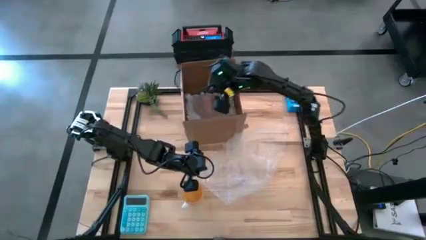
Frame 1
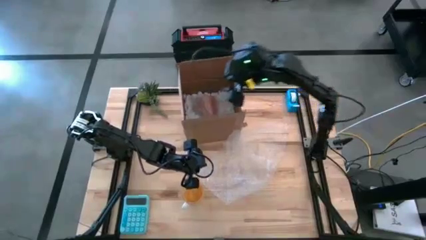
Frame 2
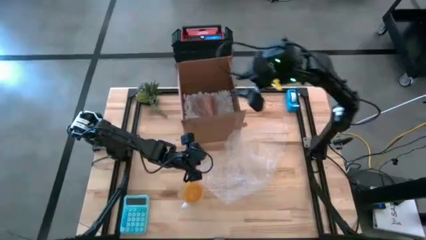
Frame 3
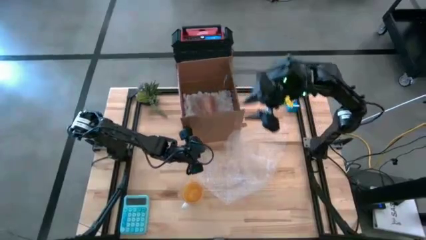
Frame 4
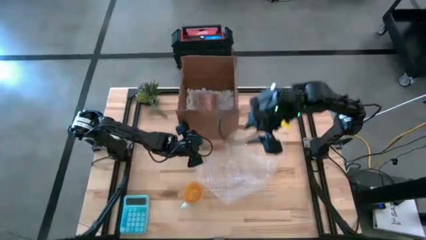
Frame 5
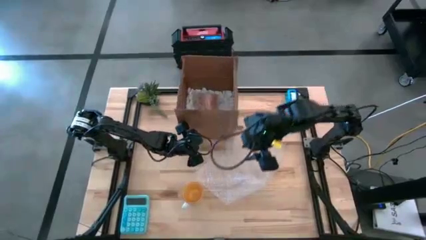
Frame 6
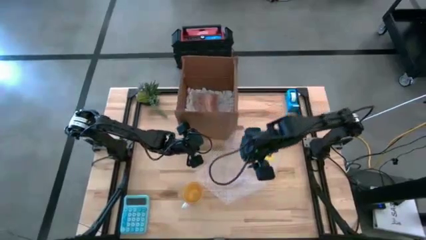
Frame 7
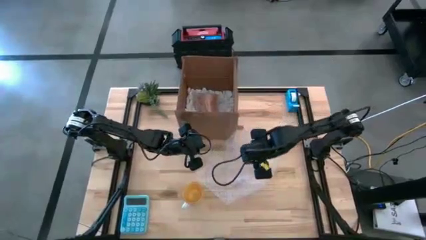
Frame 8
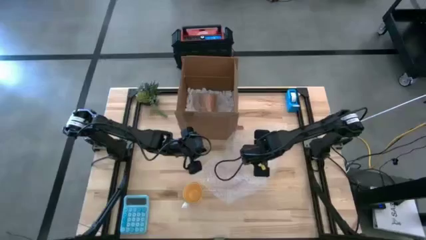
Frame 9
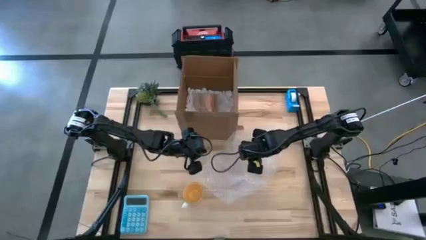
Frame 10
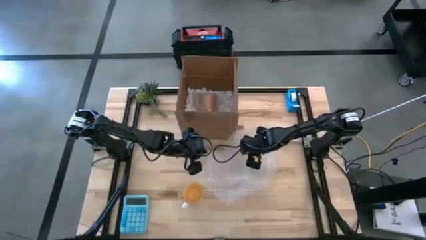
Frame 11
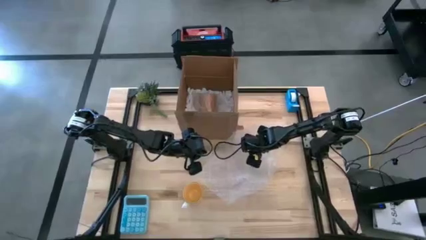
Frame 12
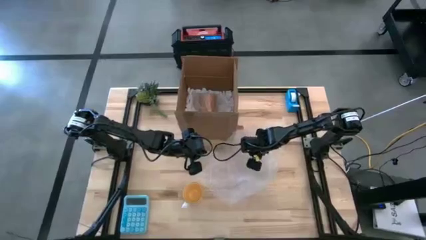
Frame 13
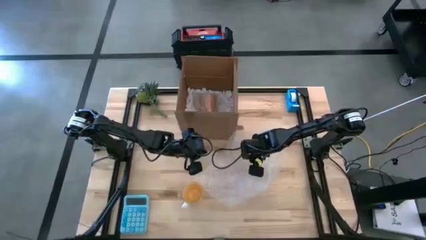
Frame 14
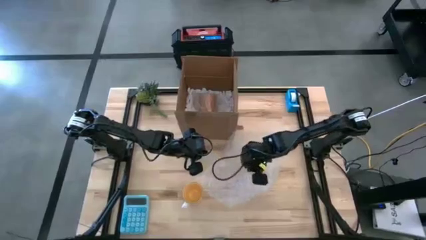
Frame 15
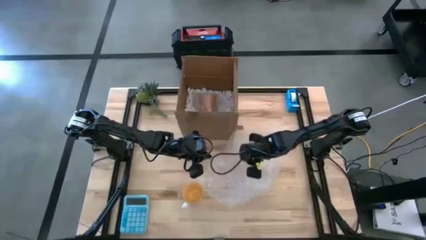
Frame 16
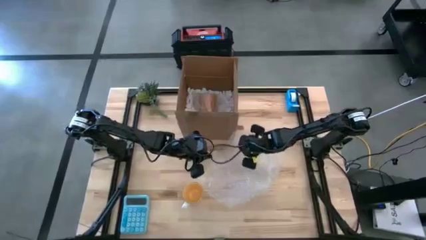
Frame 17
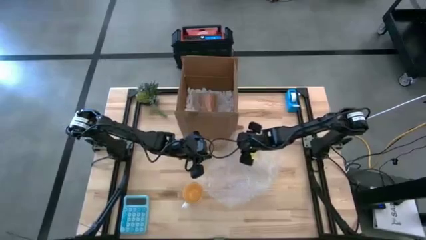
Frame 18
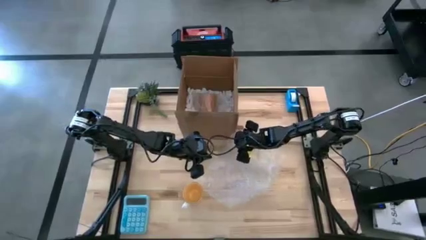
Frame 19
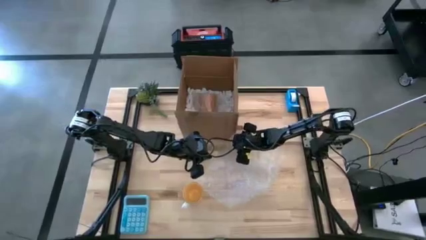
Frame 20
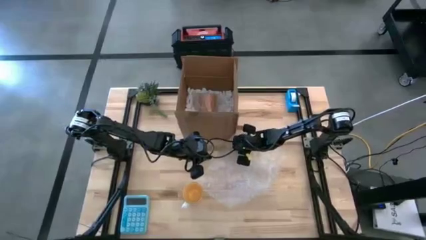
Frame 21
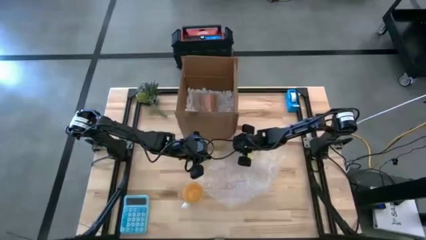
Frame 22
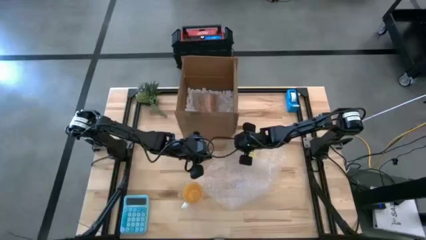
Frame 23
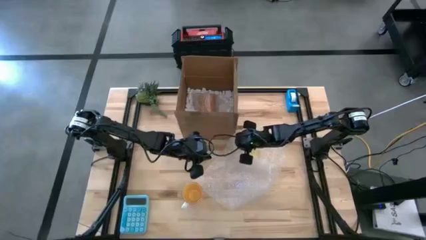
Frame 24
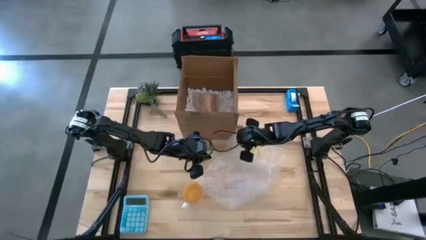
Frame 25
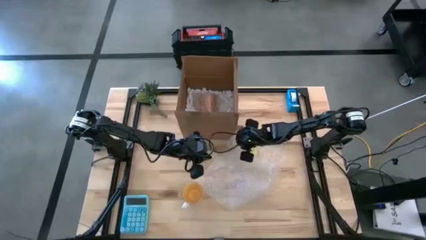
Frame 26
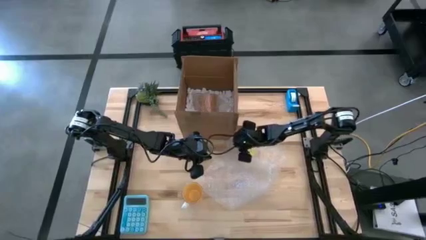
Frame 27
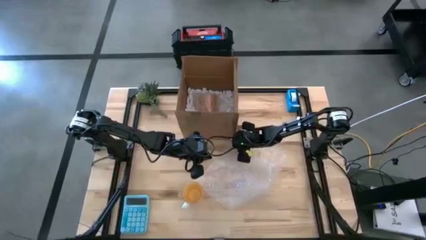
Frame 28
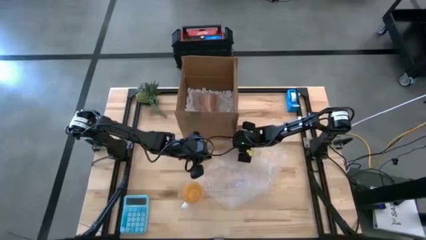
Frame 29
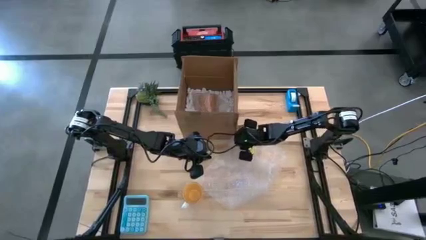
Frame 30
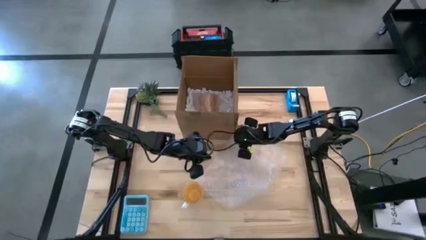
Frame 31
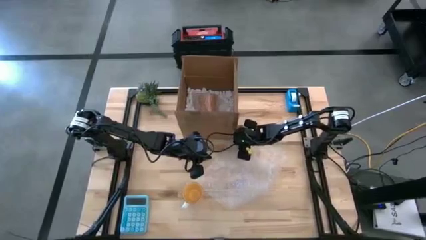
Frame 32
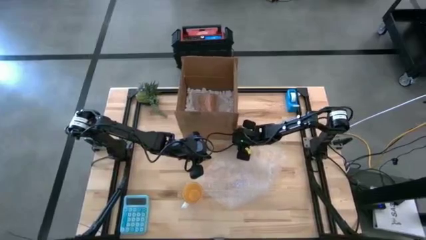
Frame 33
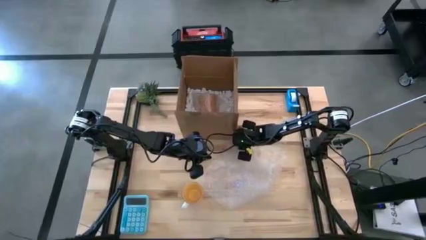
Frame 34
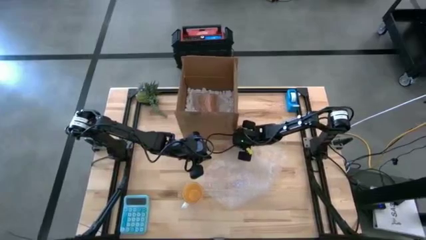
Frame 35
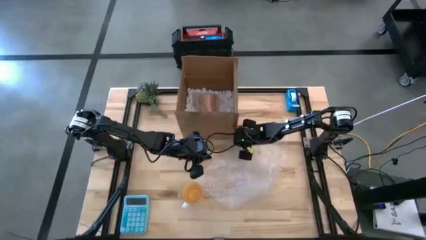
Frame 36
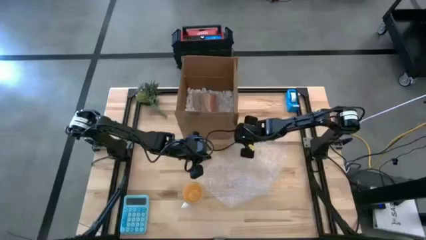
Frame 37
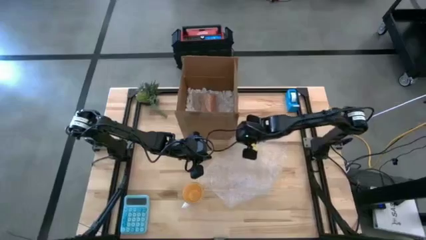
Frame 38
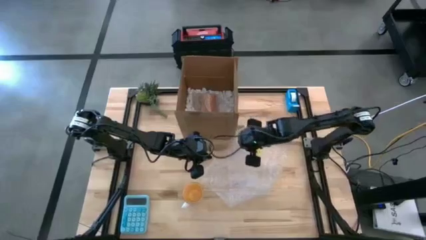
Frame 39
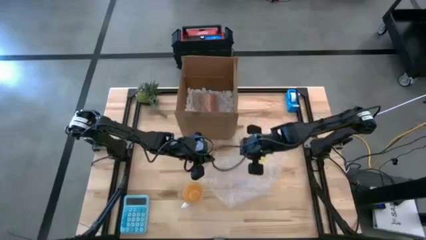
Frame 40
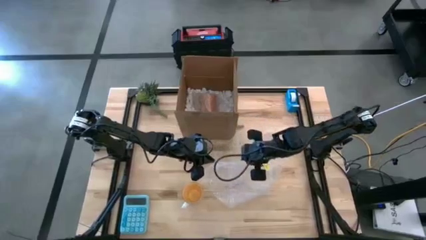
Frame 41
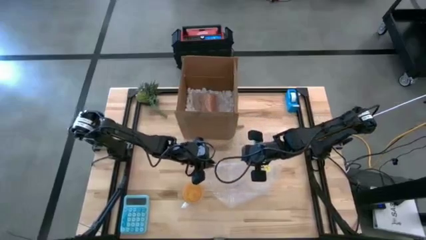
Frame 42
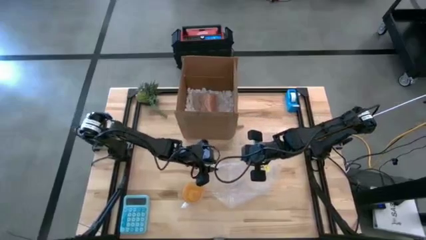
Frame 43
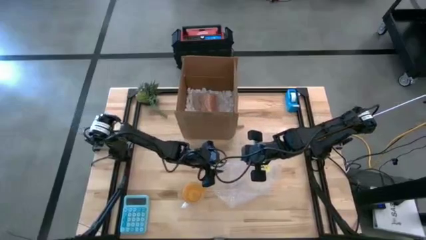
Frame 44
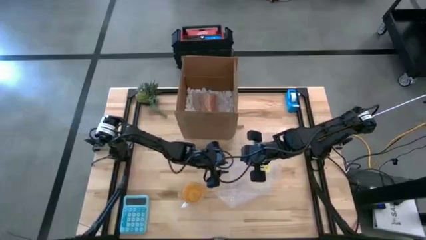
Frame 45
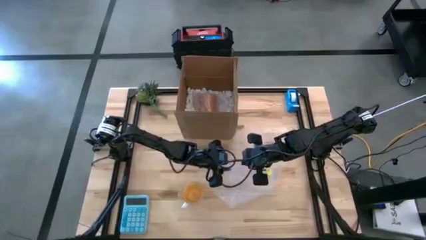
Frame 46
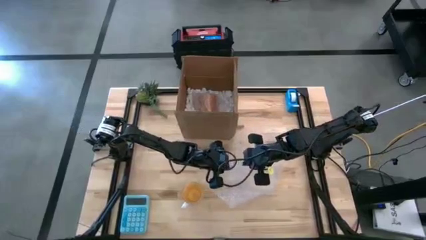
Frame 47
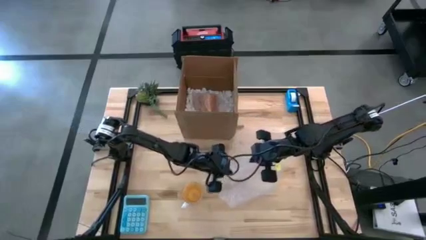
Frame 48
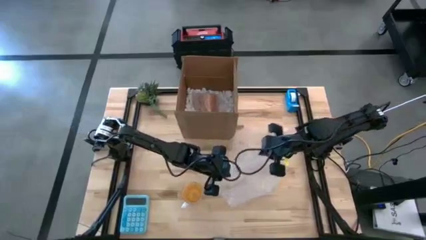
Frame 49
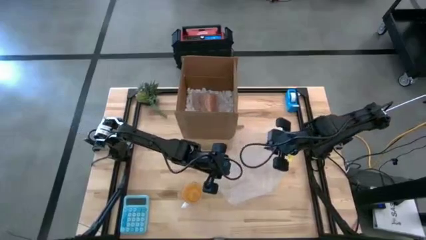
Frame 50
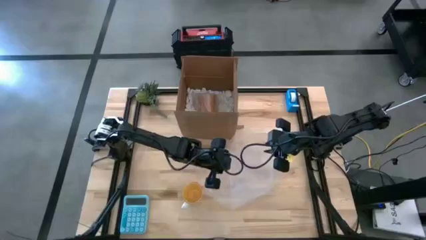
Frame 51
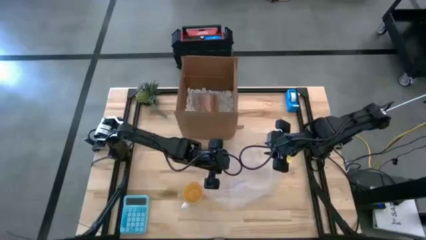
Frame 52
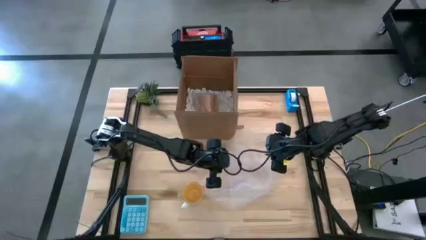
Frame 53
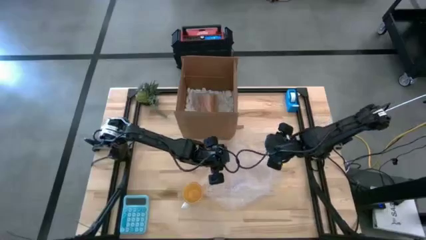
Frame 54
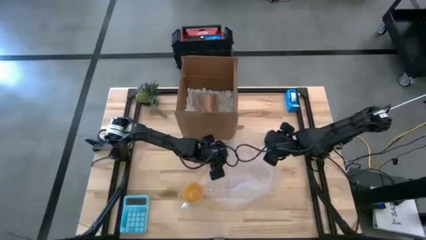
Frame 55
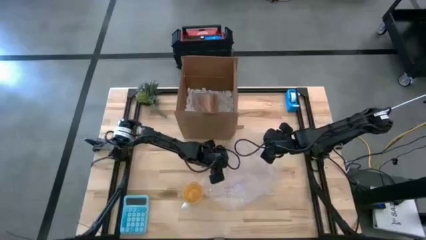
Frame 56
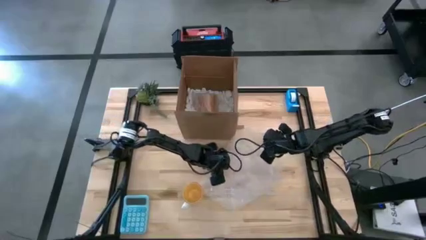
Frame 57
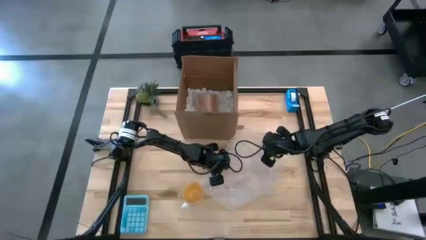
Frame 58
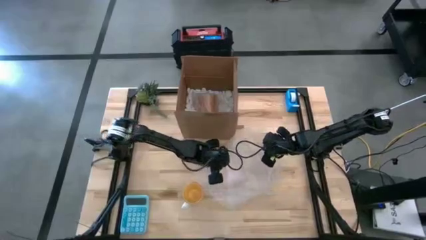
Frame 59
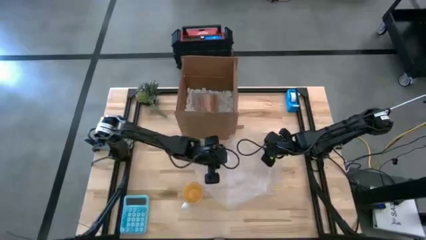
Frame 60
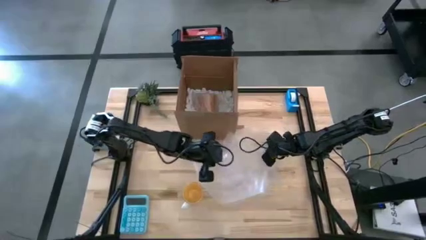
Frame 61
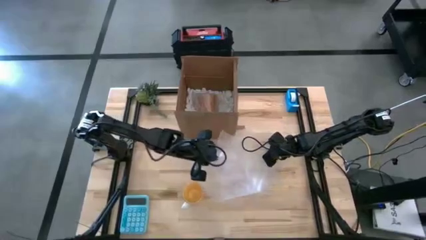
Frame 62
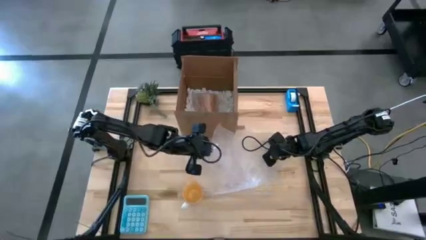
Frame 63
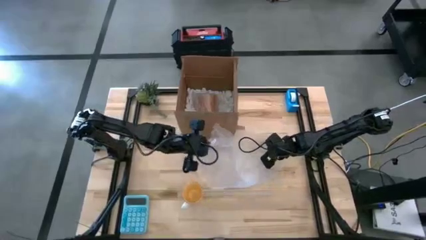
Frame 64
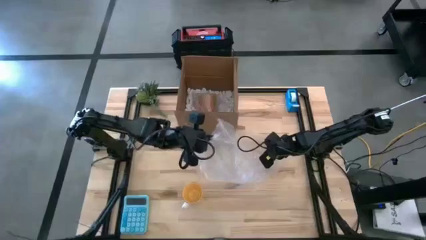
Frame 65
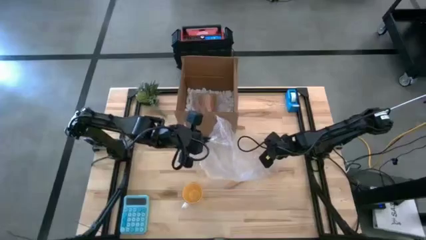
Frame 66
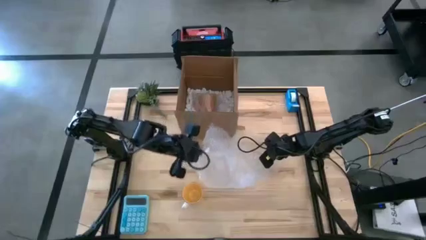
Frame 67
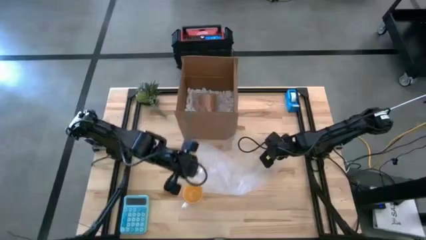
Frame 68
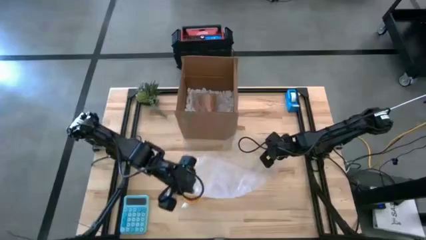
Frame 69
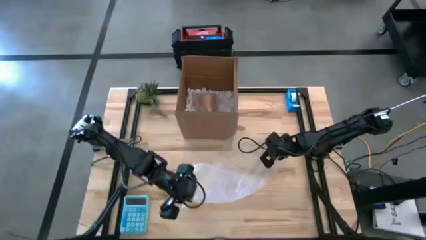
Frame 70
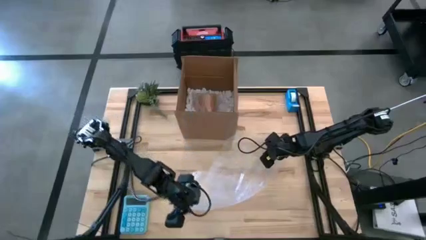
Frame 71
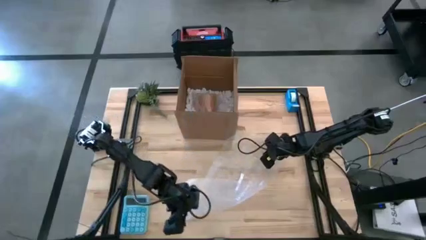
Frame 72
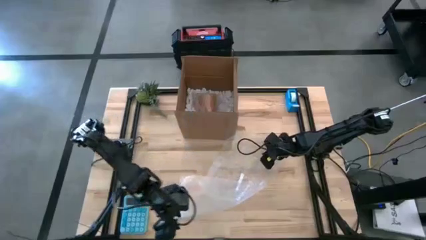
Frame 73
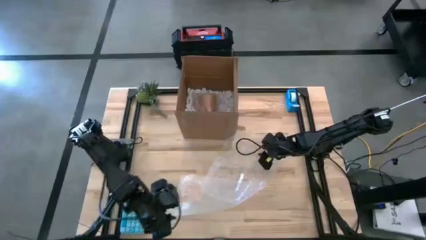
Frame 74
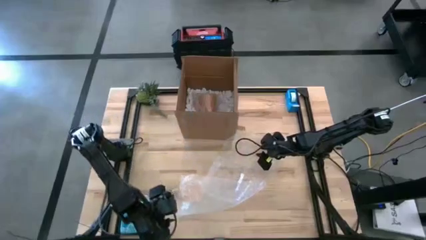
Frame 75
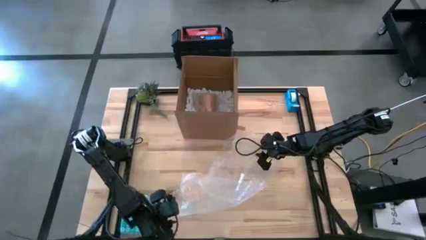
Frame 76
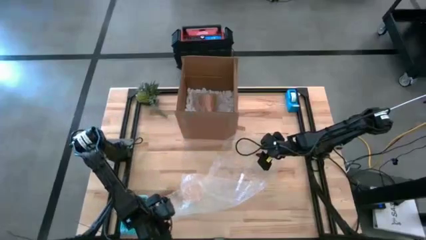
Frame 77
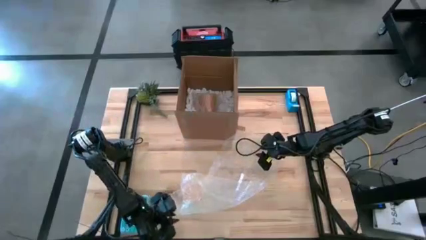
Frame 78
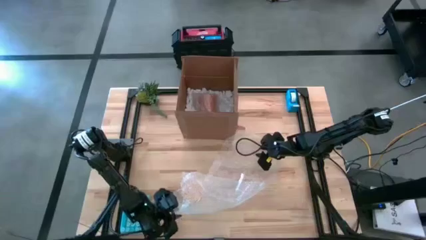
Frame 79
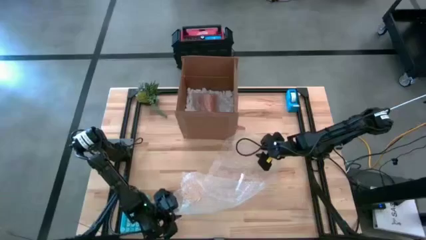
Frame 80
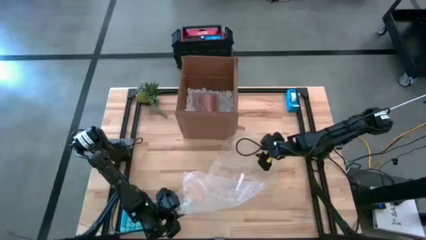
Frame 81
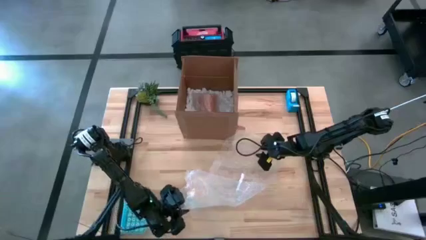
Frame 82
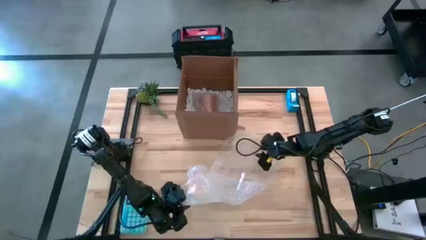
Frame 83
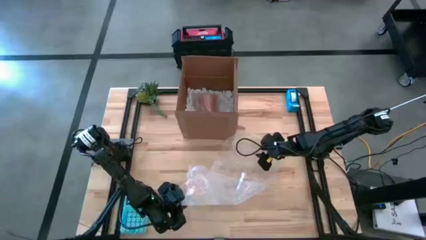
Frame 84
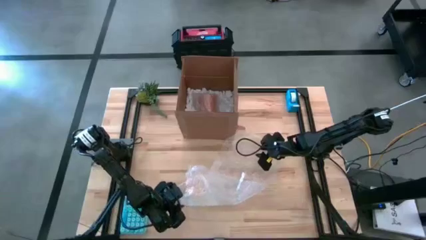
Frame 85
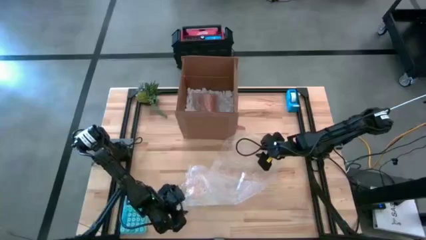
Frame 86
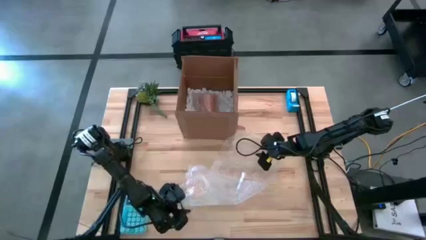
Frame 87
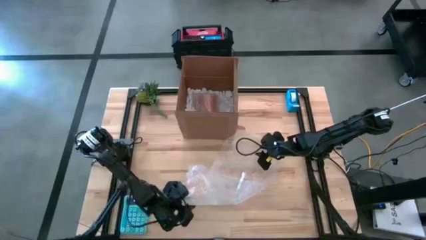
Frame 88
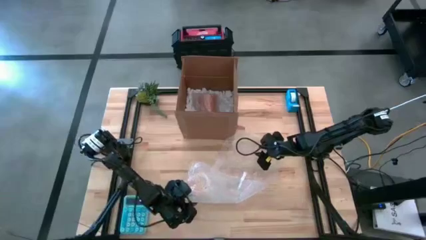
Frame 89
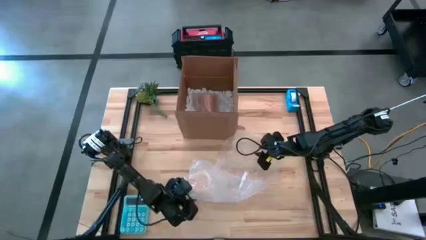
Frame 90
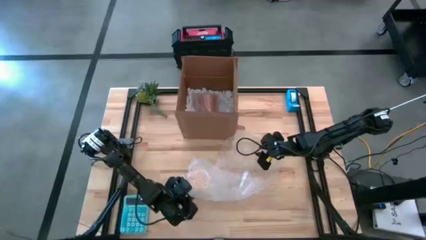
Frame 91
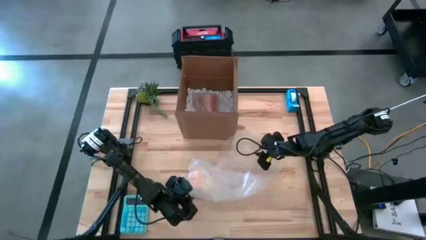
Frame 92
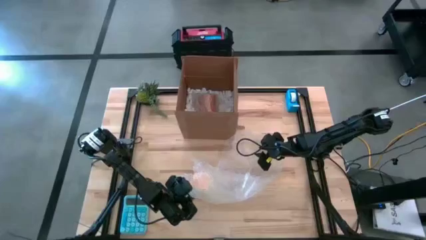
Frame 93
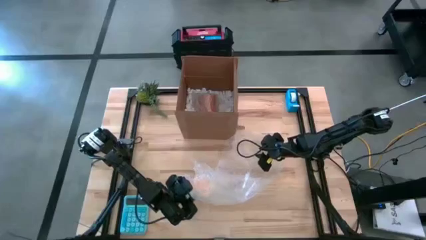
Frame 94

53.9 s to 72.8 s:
Task: wrap mug
Wrap the yellow mug with bubble wrap
